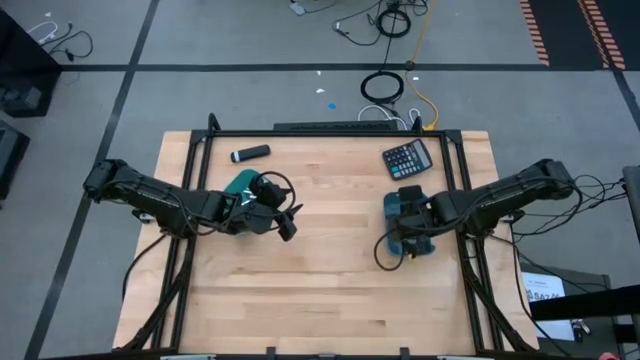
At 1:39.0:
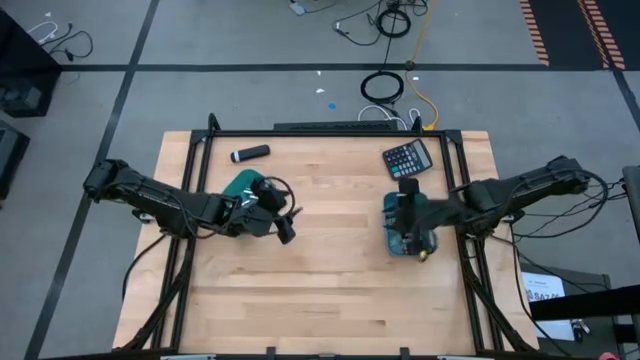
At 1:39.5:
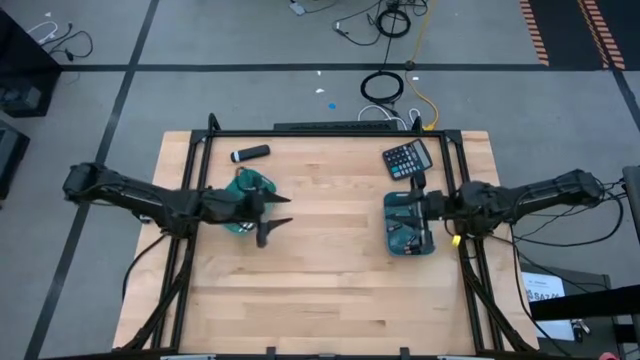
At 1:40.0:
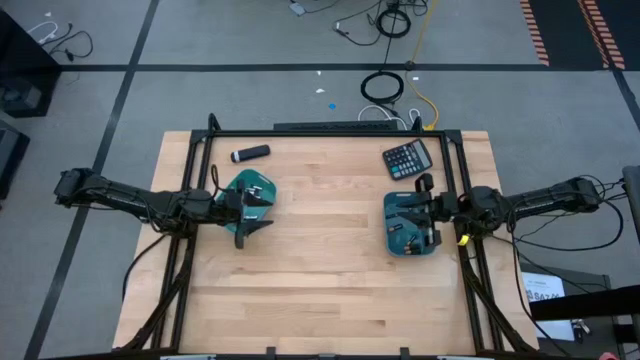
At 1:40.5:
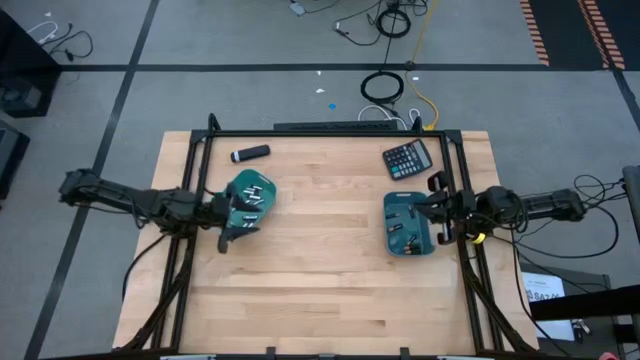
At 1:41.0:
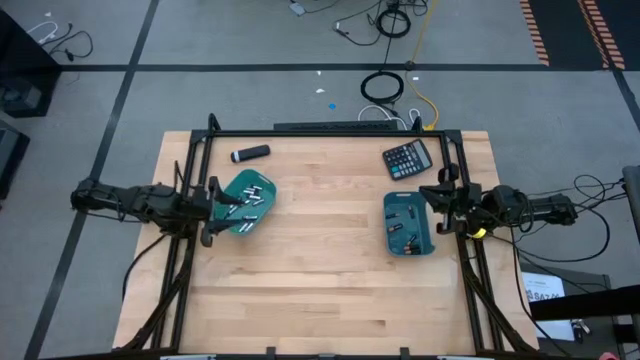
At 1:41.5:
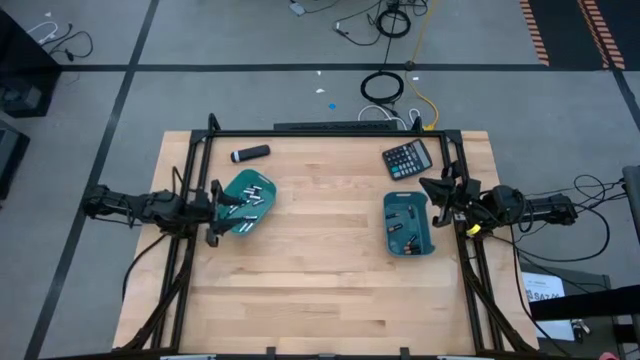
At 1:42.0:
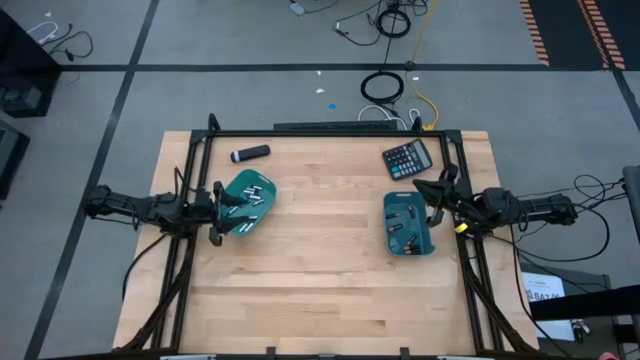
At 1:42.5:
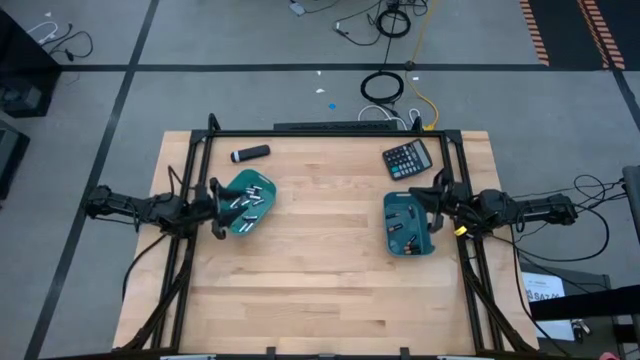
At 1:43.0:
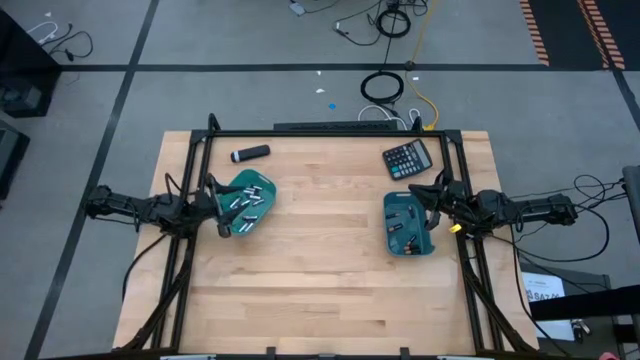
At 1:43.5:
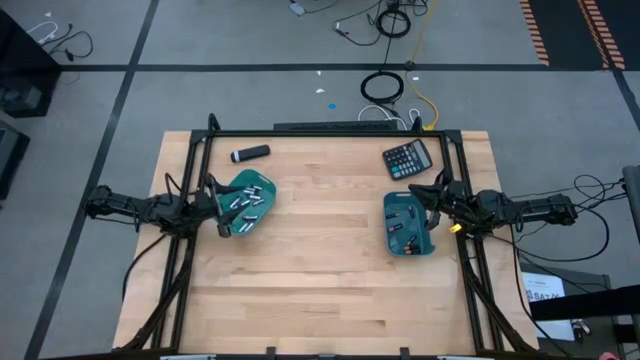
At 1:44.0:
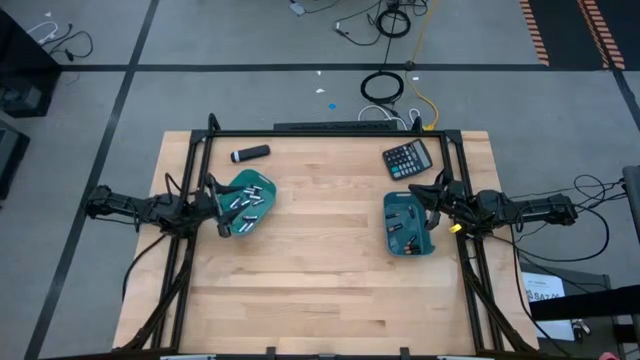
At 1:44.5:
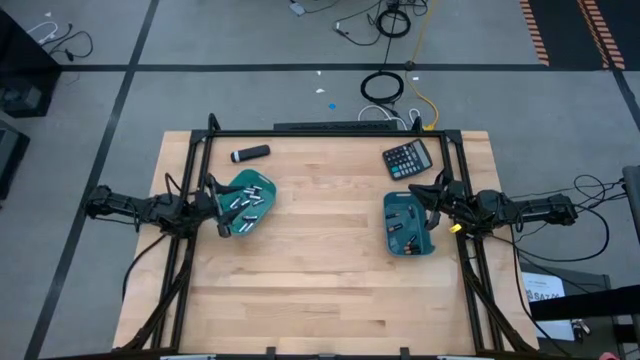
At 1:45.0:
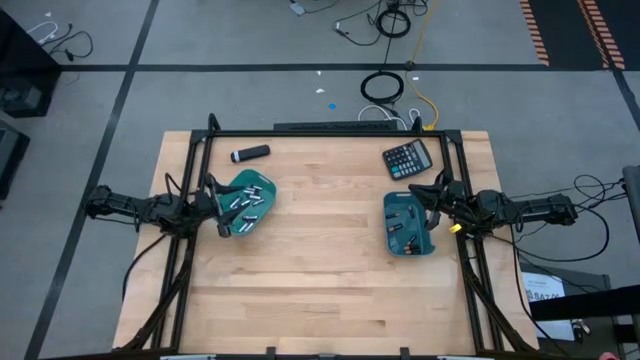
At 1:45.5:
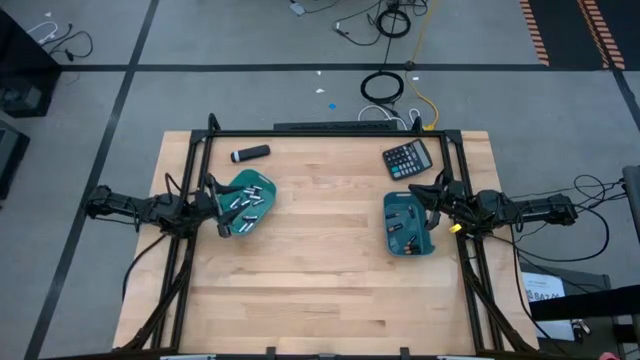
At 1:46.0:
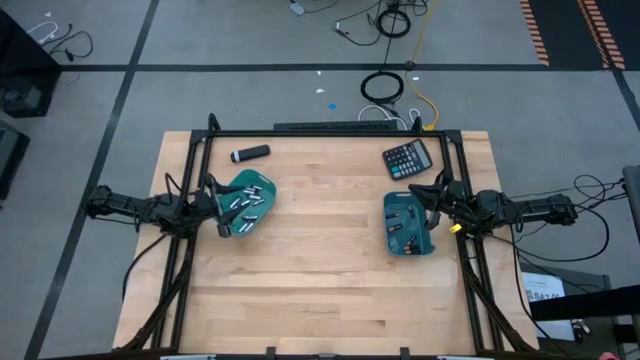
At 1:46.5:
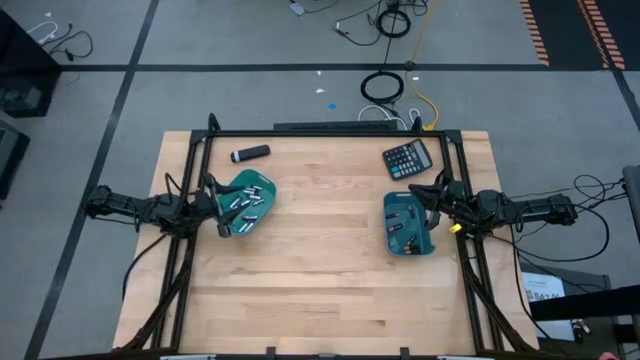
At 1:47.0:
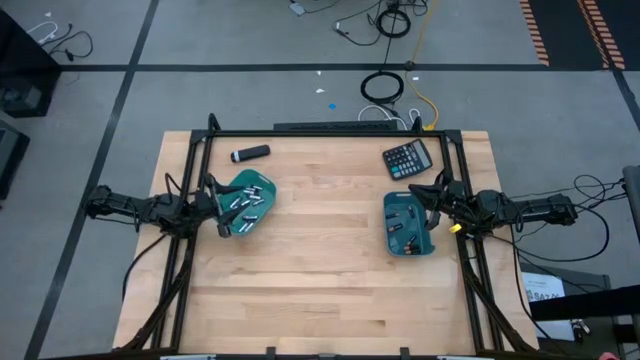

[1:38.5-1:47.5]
Task: Sort batteries
Return to Home Position

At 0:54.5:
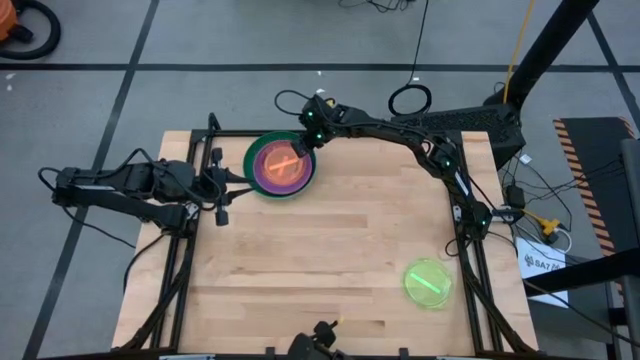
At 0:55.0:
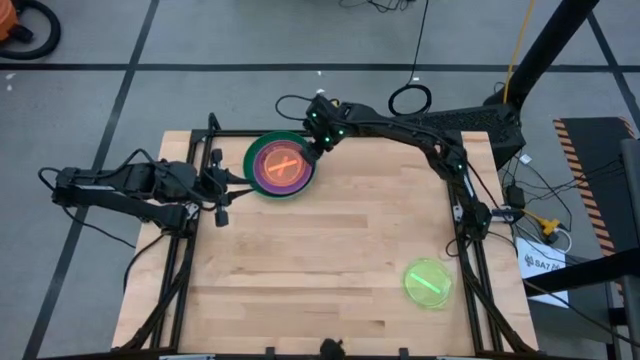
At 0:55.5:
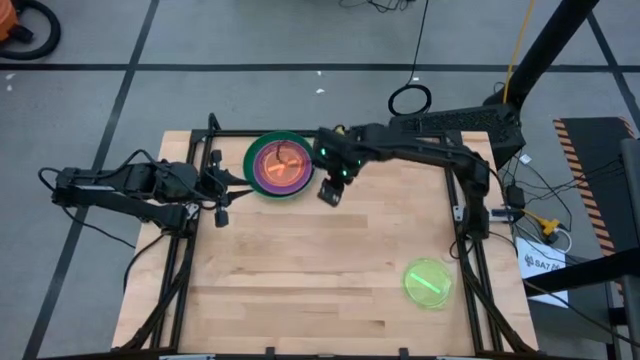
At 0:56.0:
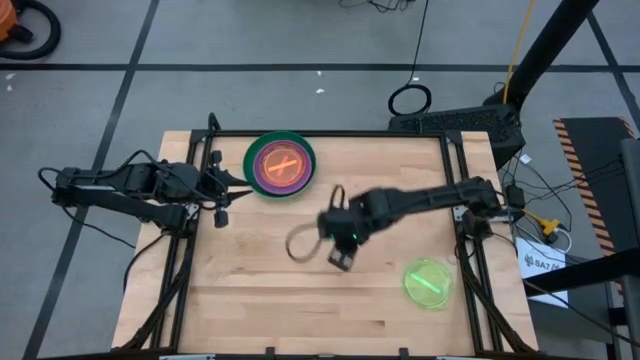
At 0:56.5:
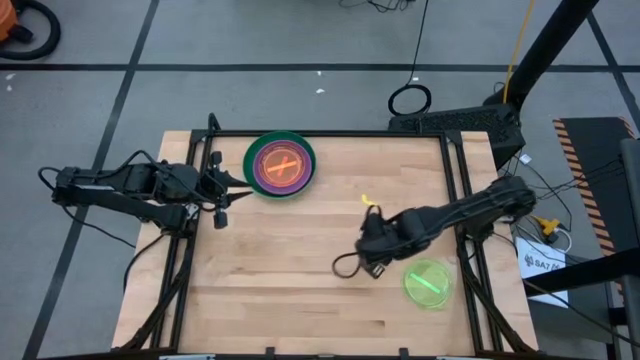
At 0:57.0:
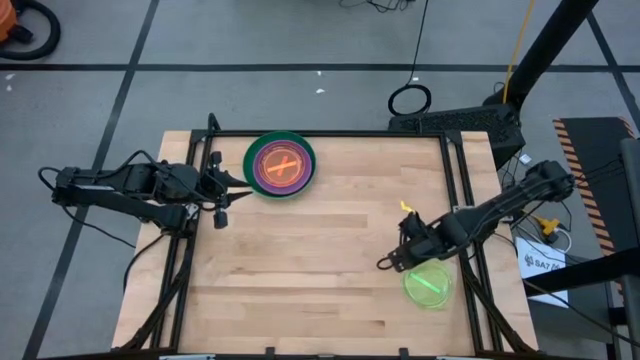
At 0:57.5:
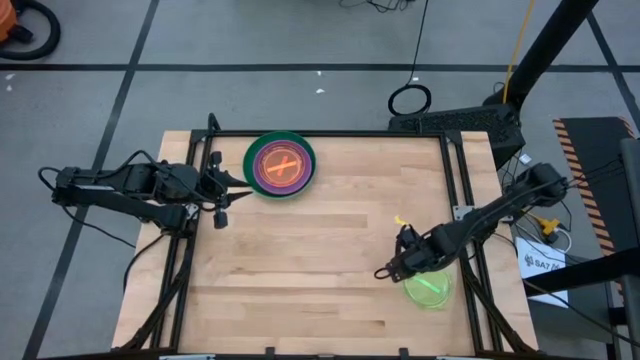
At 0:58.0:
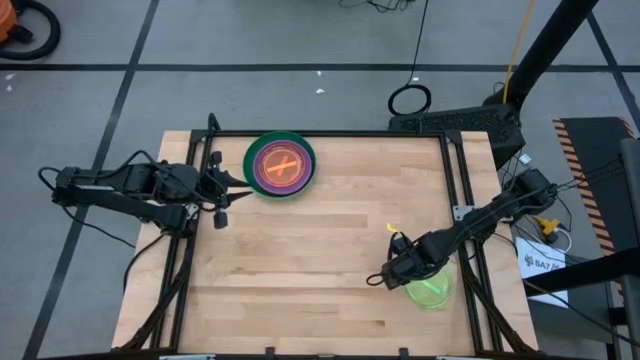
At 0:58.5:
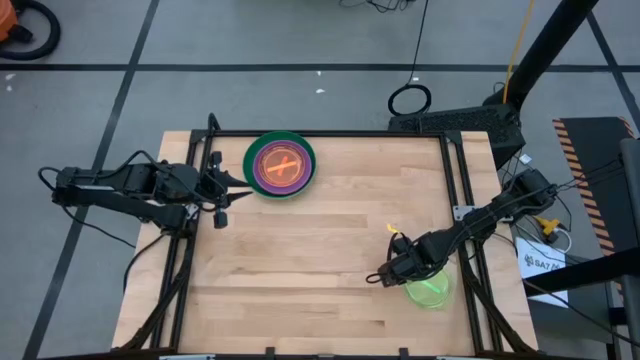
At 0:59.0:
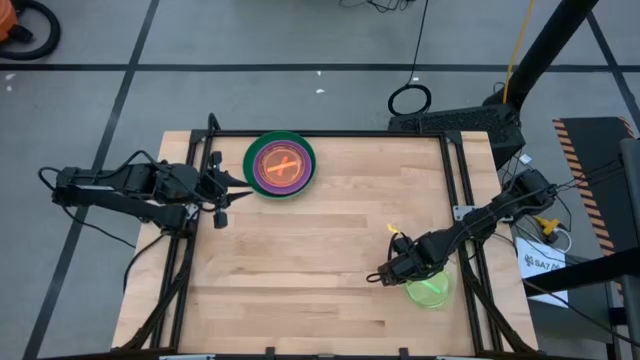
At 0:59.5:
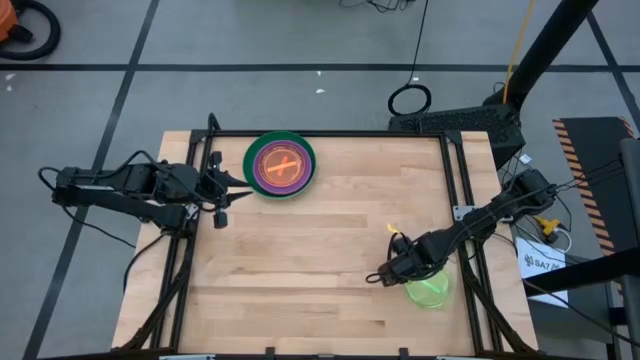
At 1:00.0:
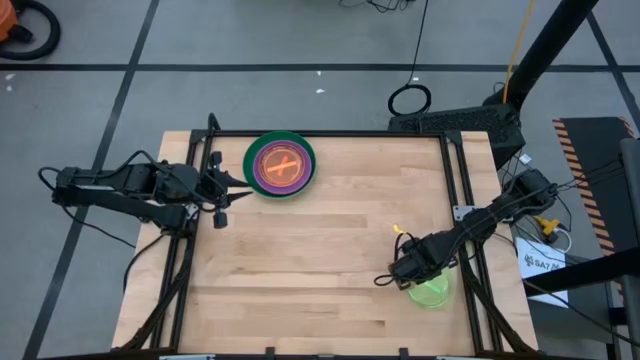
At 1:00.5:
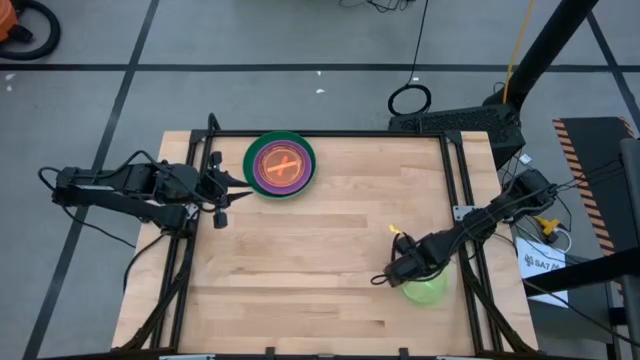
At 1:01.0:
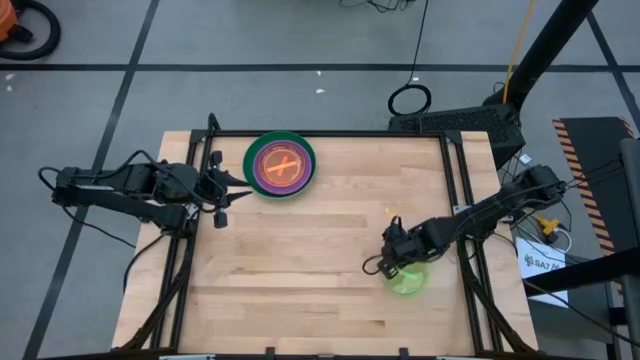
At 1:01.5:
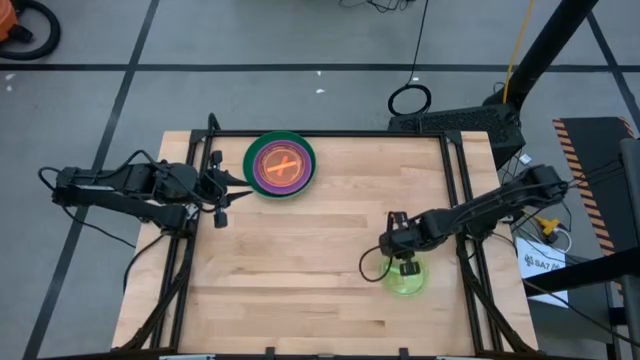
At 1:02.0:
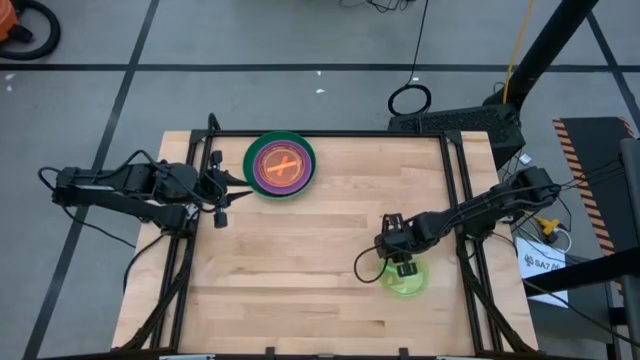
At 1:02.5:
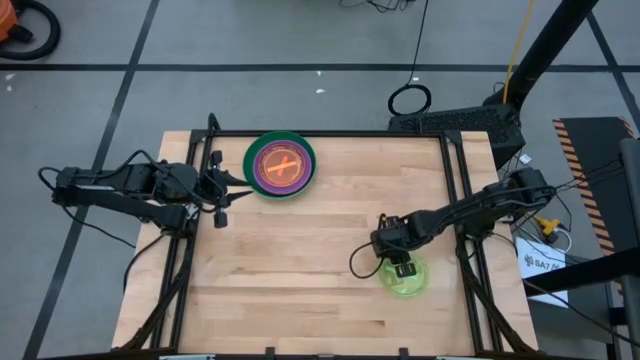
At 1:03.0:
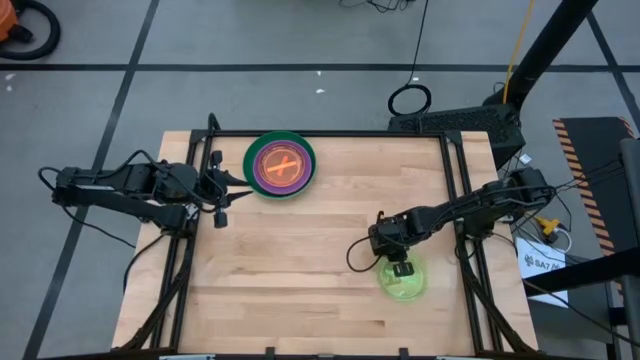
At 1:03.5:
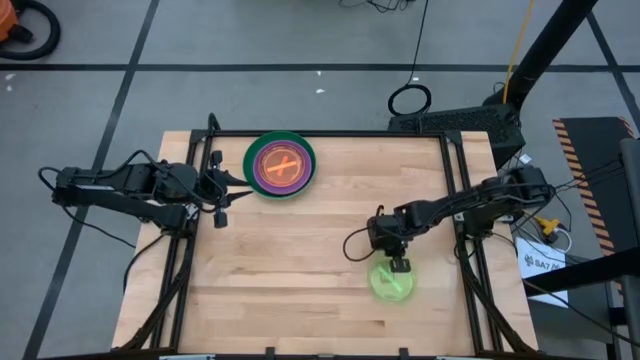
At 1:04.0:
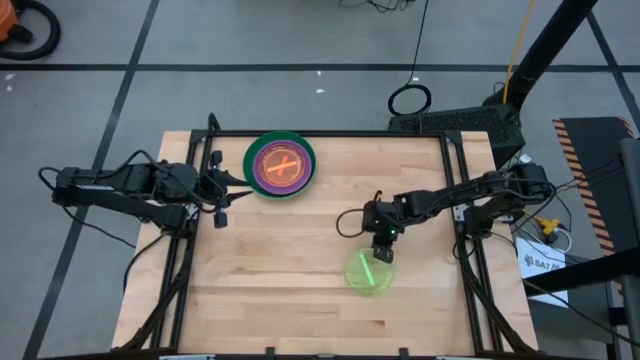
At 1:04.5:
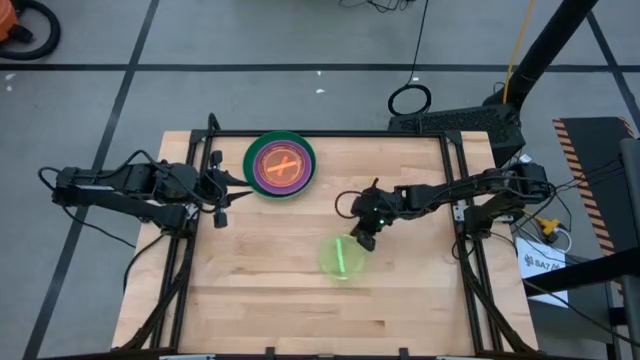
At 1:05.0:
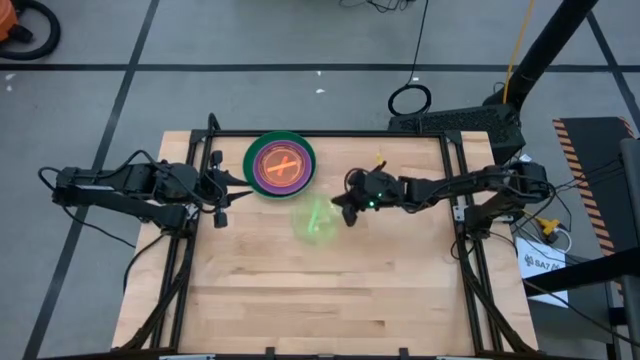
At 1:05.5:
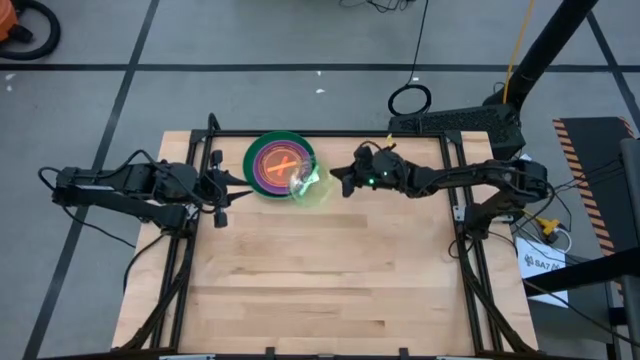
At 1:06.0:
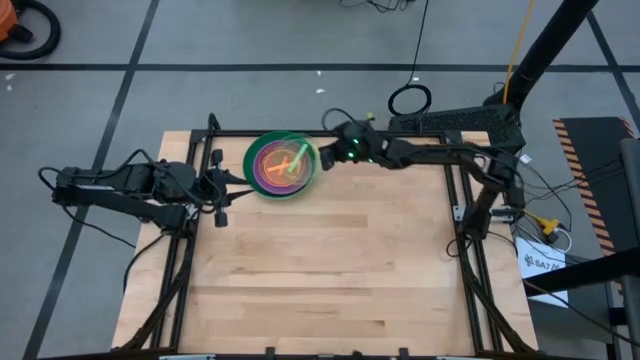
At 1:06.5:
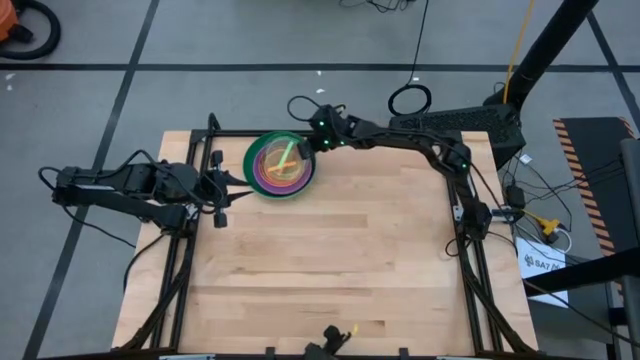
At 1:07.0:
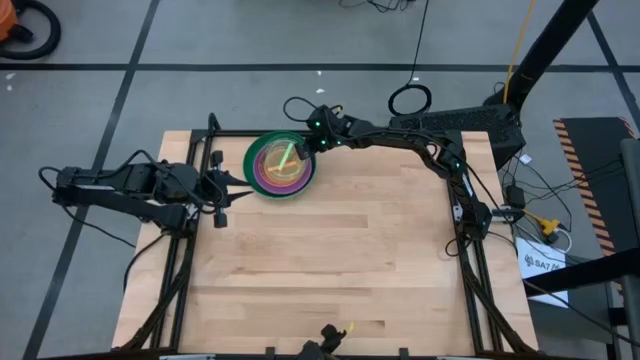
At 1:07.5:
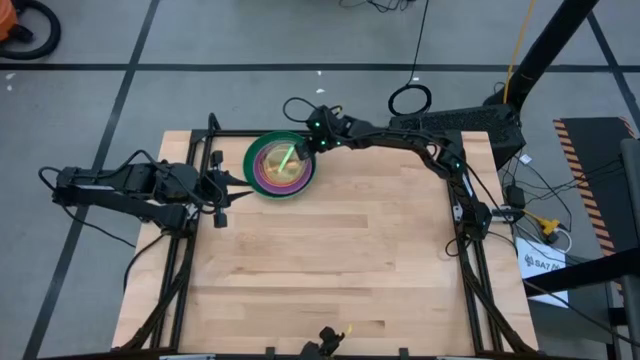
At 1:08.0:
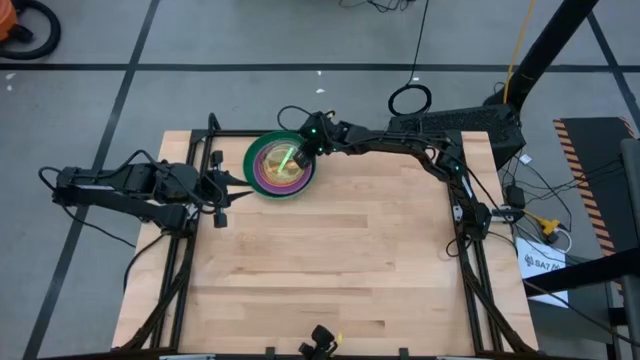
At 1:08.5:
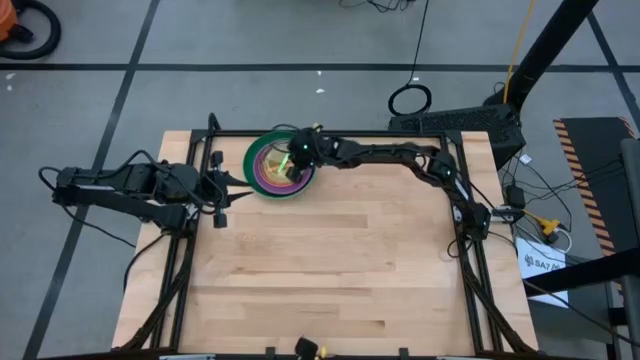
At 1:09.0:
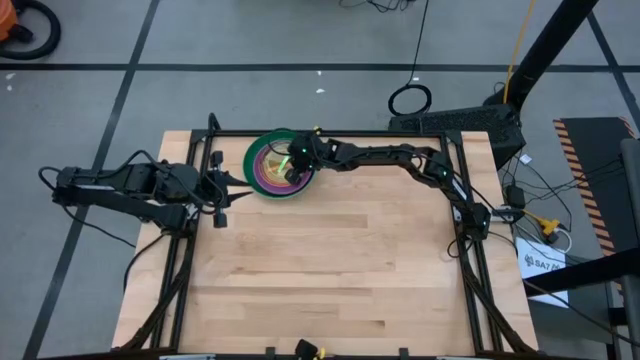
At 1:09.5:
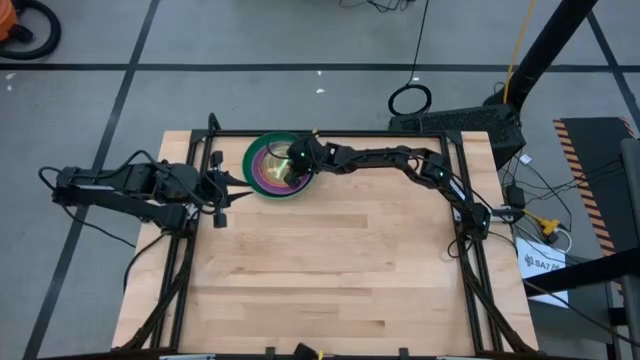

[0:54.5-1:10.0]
Task: Stack plastic plates
Stack the green plate on top of the orange plate
